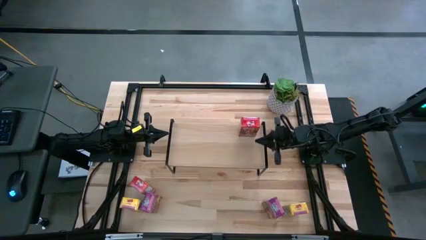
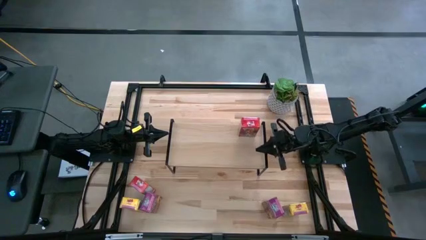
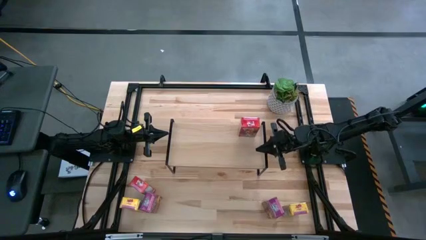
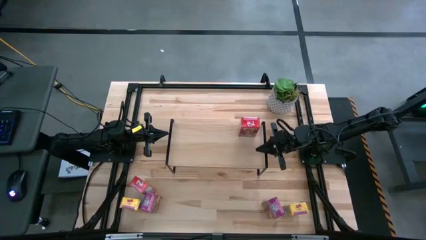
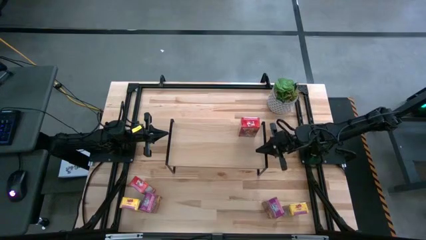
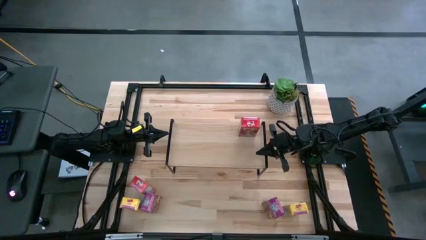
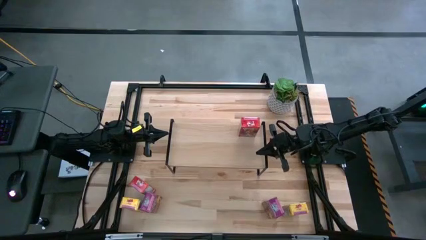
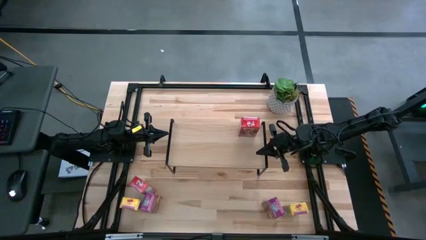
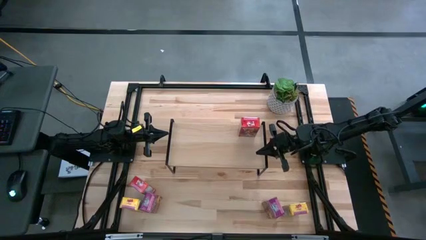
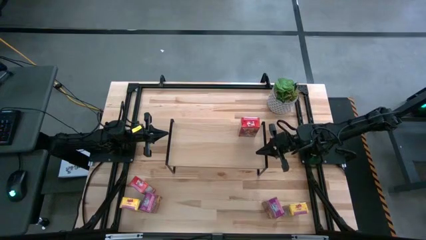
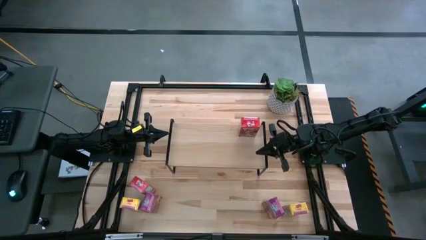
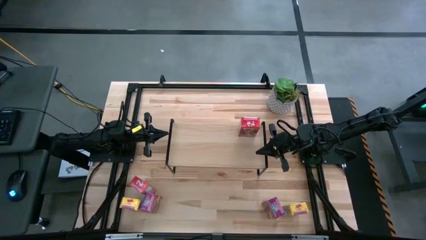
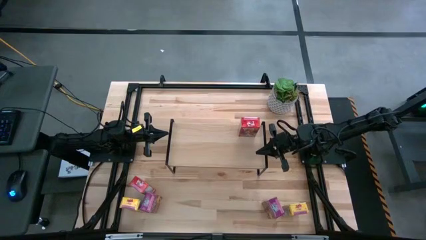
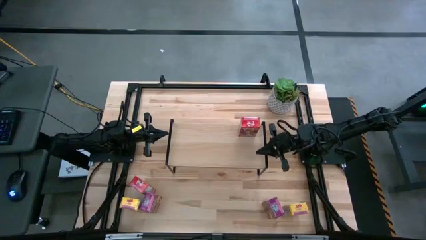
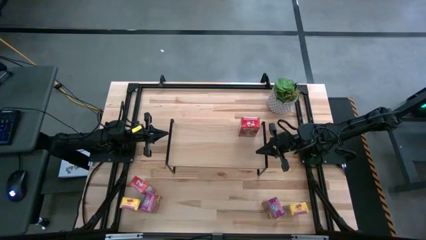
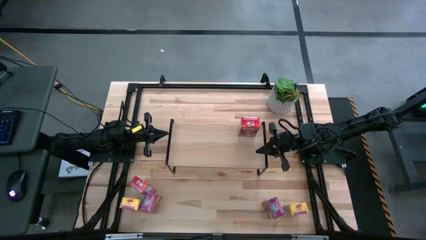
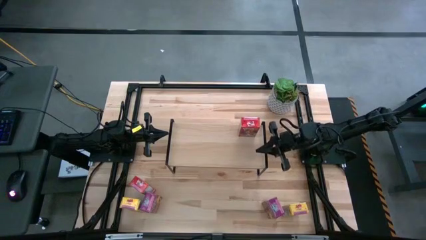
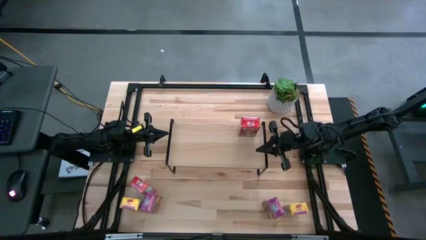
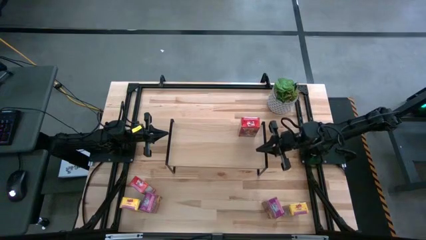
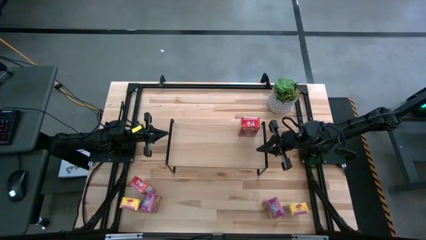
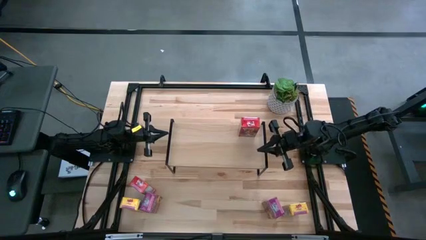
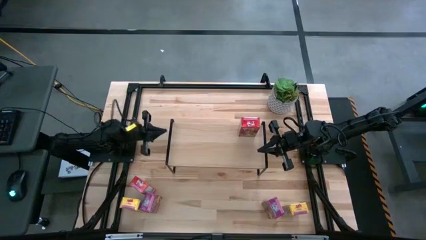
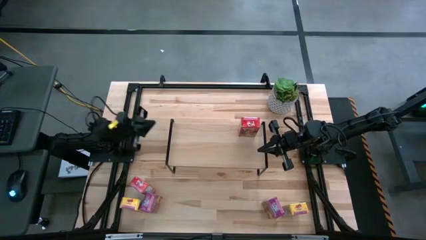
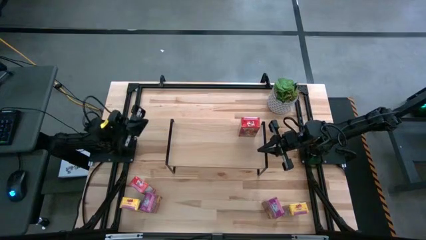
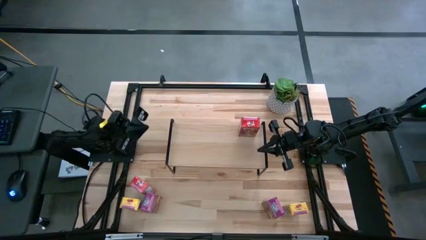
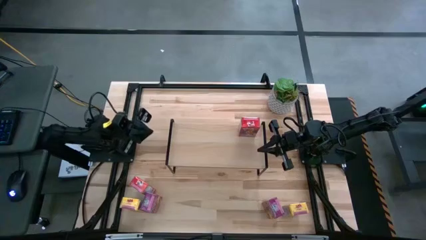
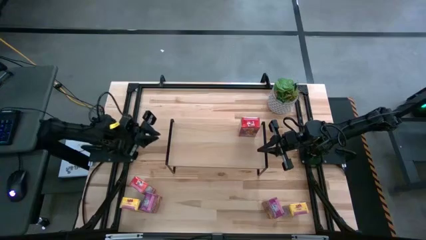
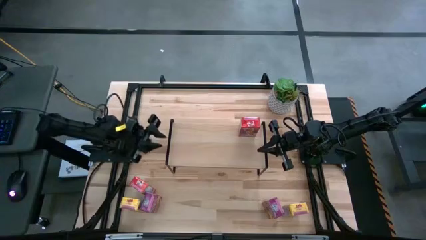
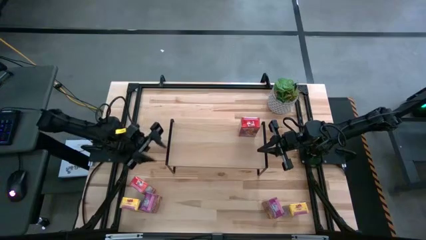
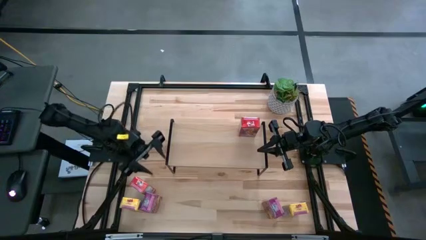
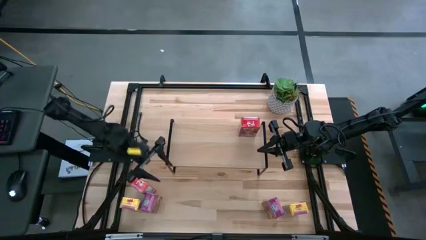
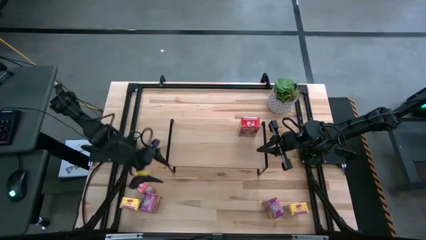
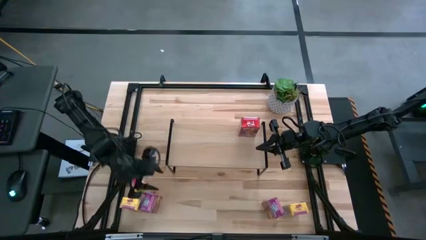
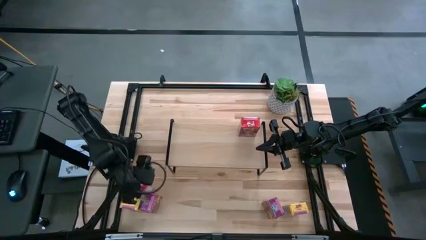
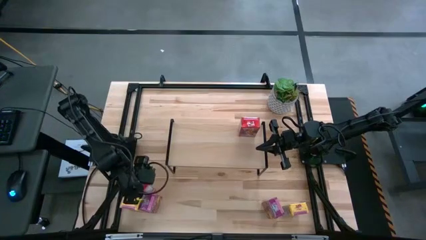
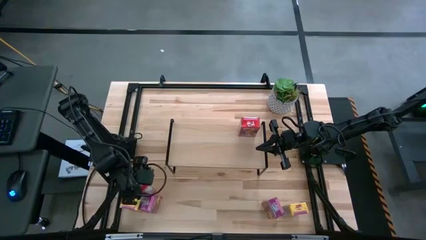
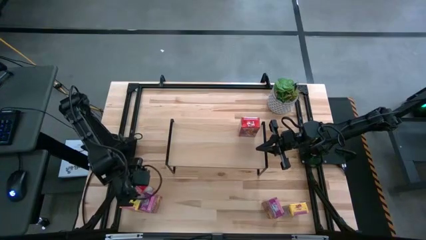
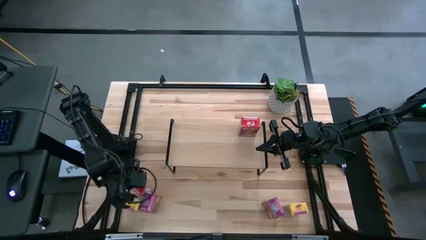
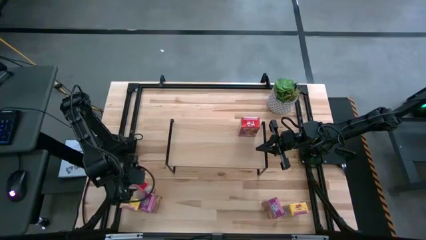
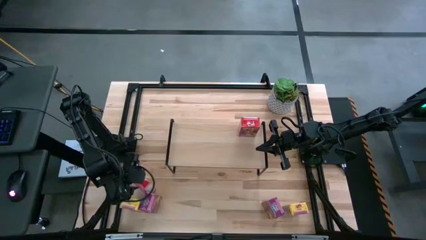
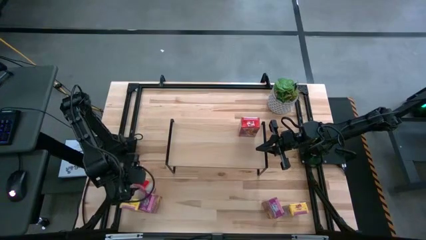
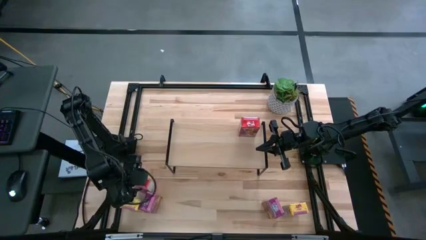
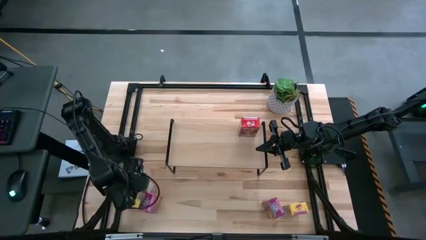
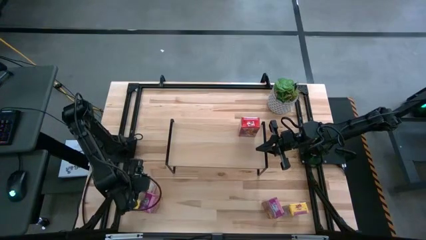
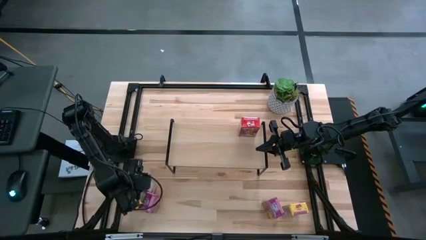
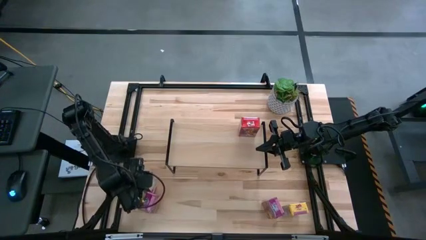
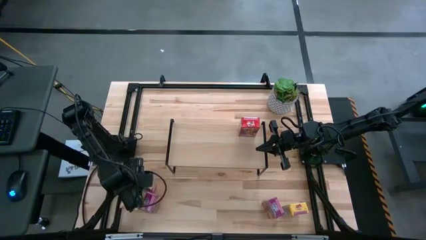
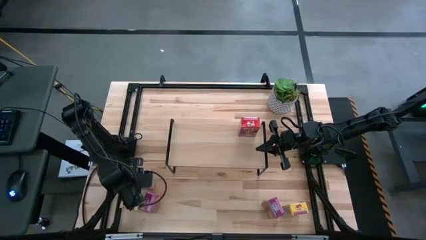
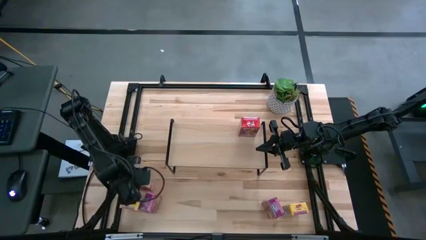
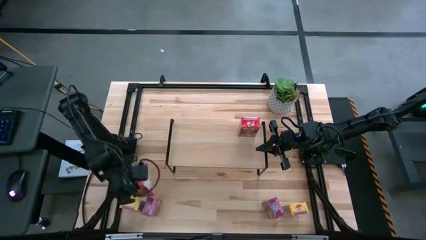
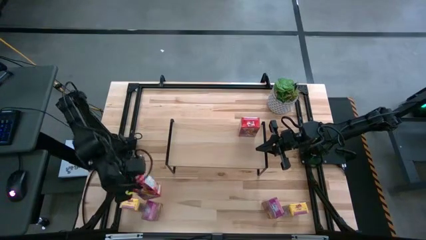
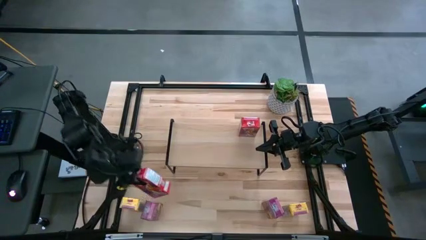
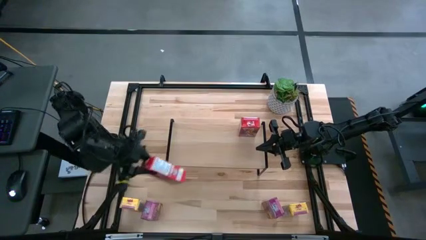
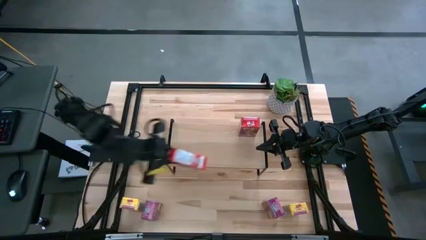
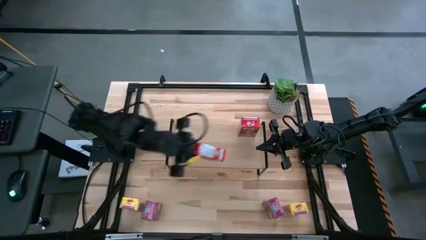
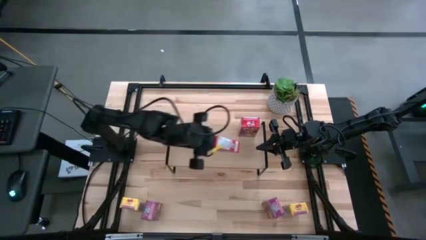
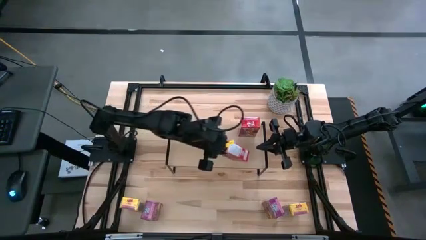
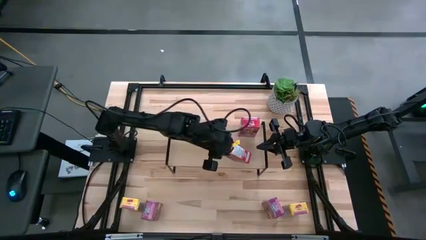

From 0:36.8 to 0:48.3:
Task: Stack cereal on shelf
Put the red cereal box on the shelf aligned with the red cereal box
